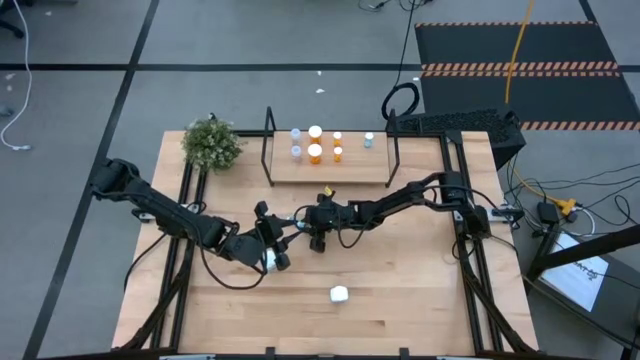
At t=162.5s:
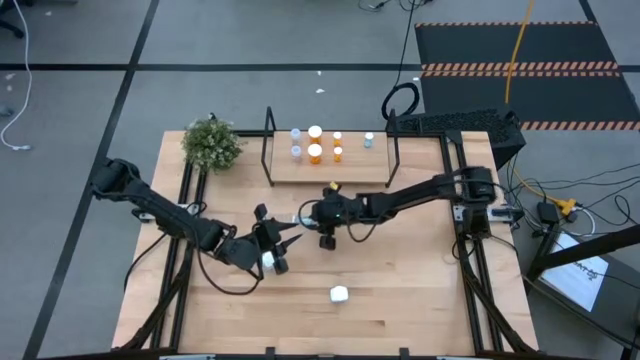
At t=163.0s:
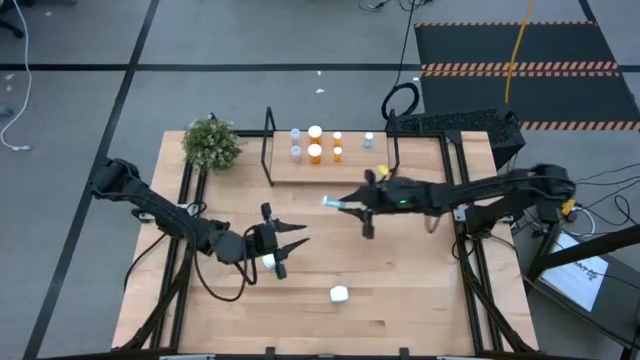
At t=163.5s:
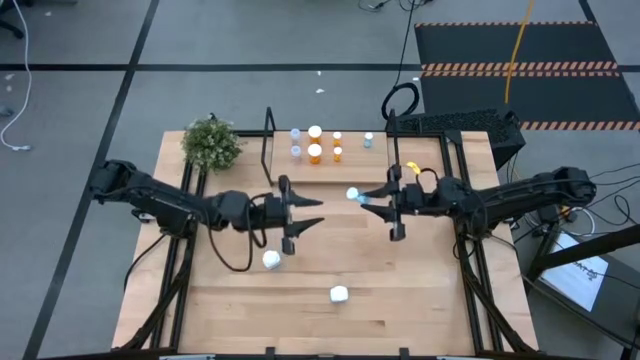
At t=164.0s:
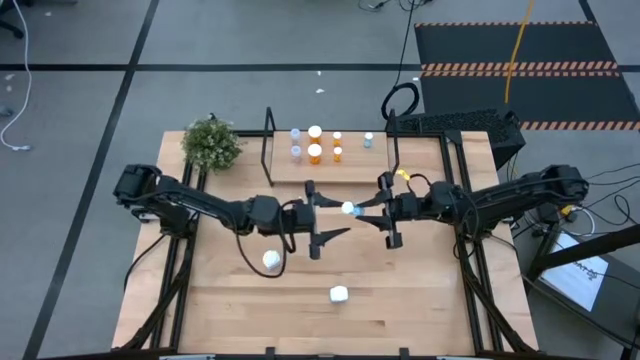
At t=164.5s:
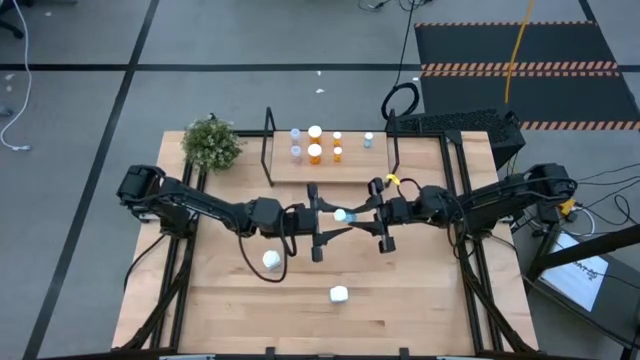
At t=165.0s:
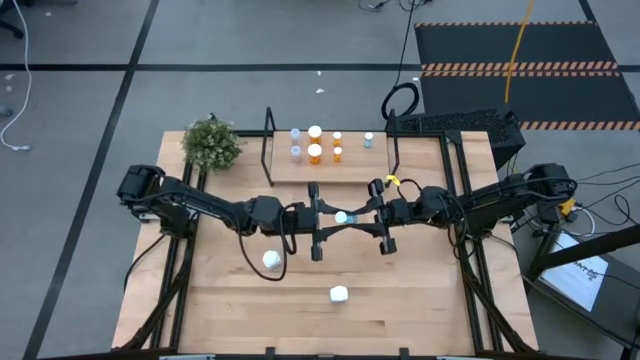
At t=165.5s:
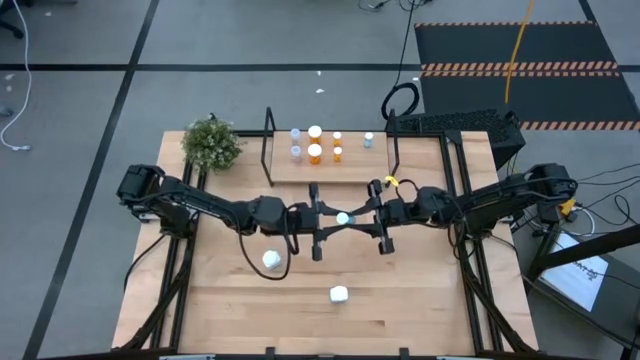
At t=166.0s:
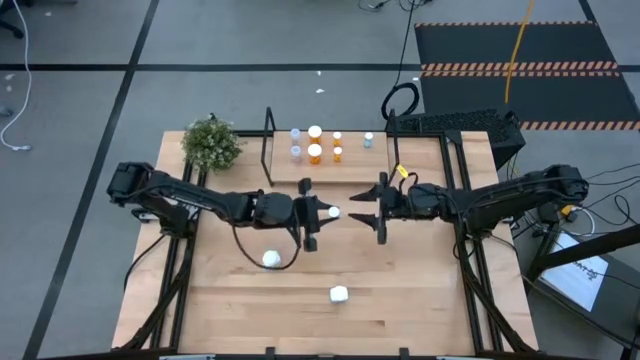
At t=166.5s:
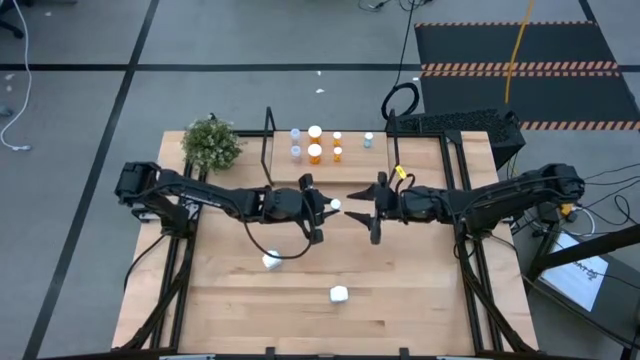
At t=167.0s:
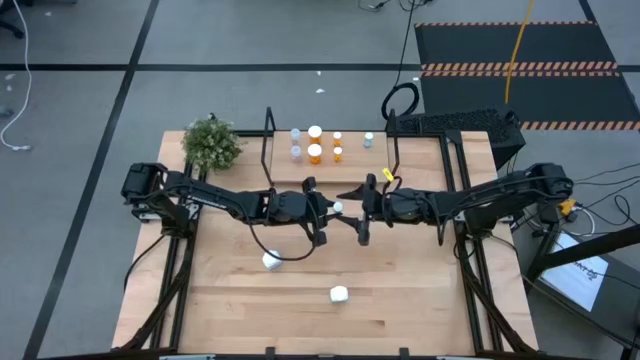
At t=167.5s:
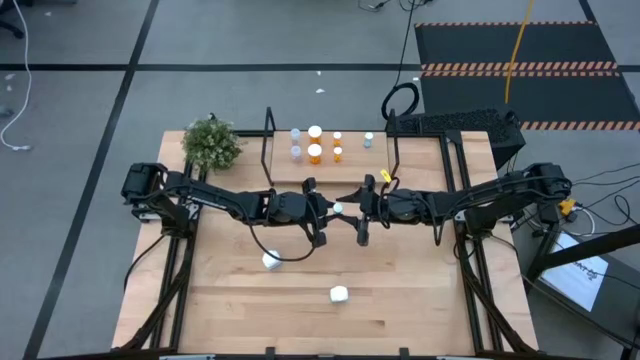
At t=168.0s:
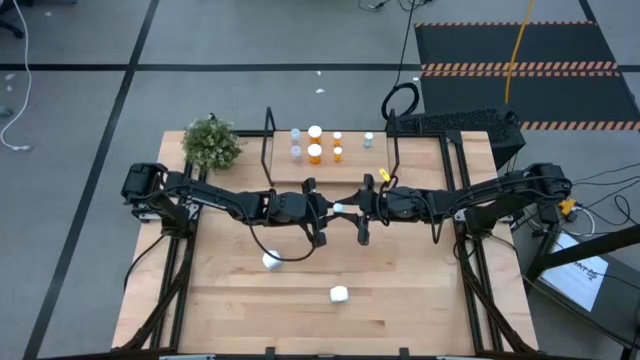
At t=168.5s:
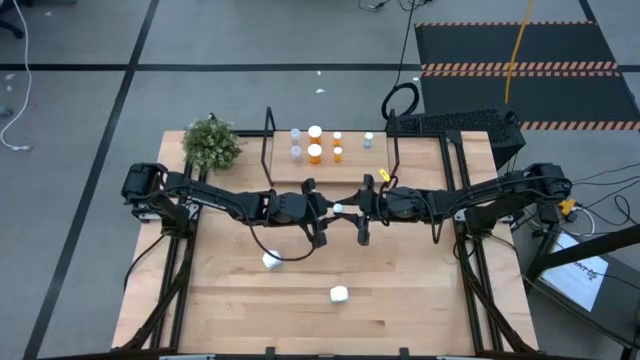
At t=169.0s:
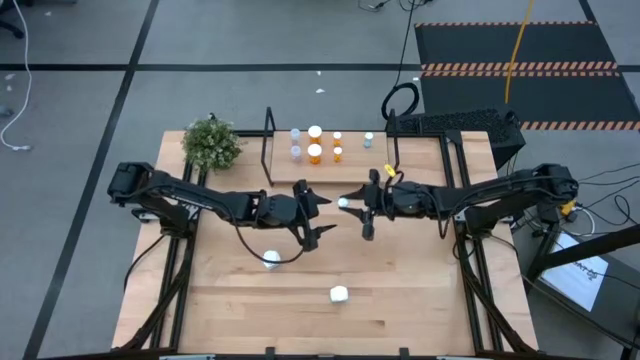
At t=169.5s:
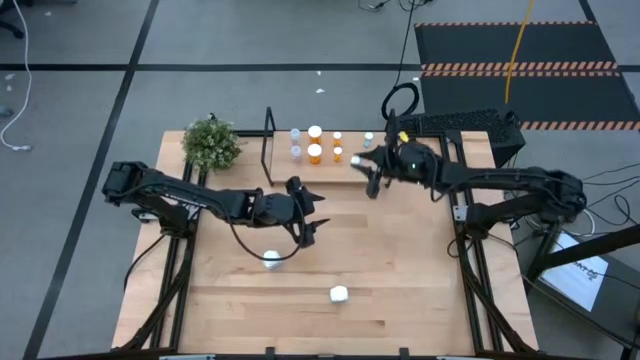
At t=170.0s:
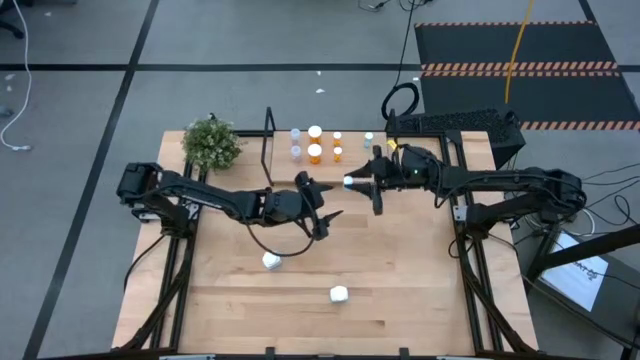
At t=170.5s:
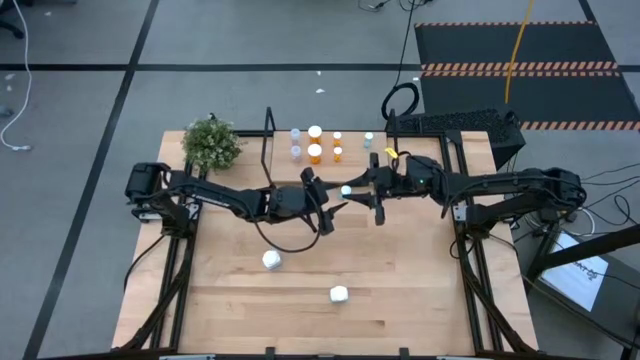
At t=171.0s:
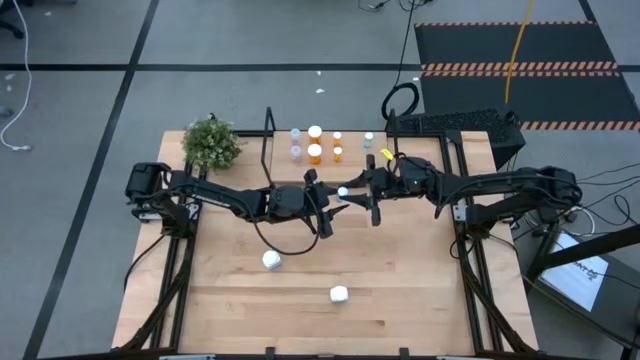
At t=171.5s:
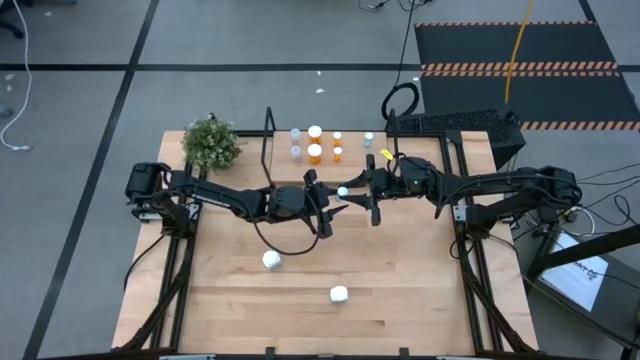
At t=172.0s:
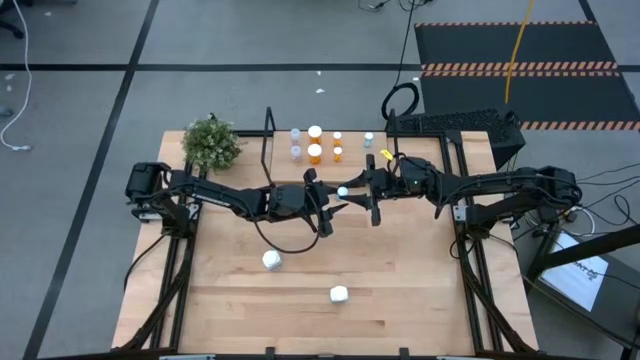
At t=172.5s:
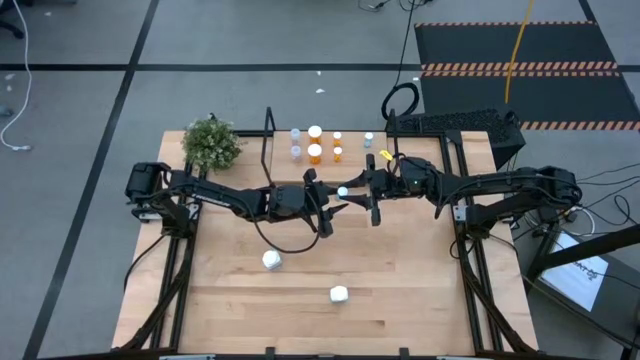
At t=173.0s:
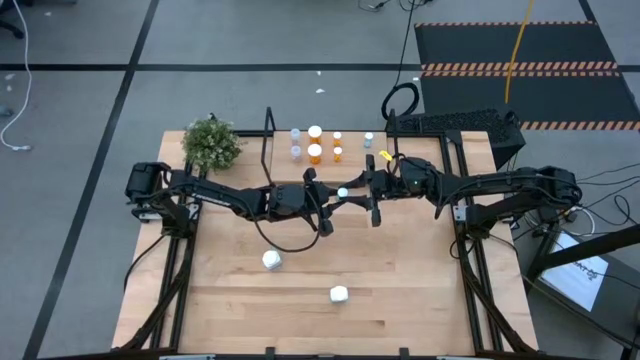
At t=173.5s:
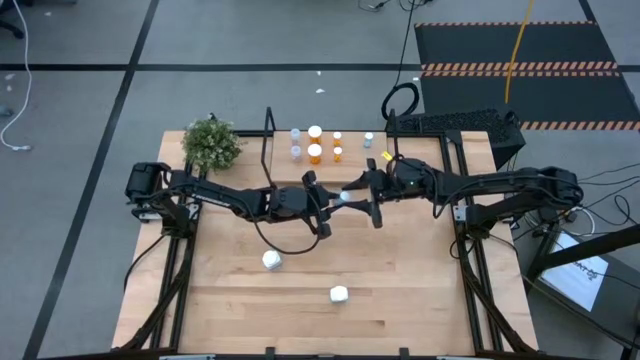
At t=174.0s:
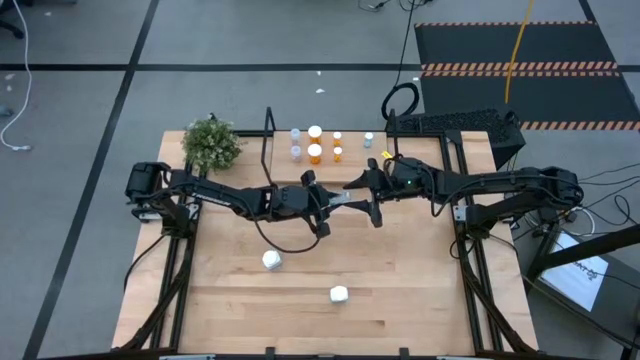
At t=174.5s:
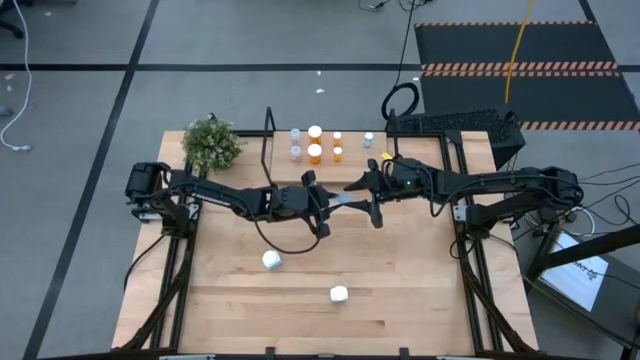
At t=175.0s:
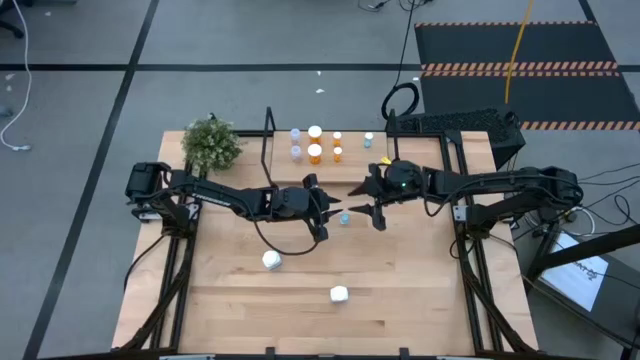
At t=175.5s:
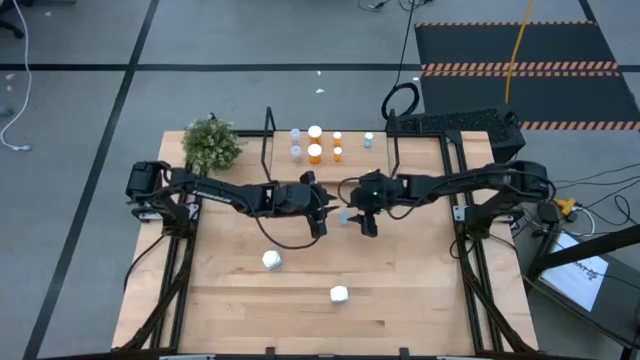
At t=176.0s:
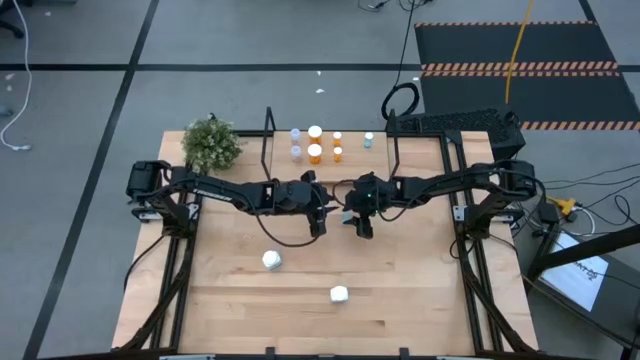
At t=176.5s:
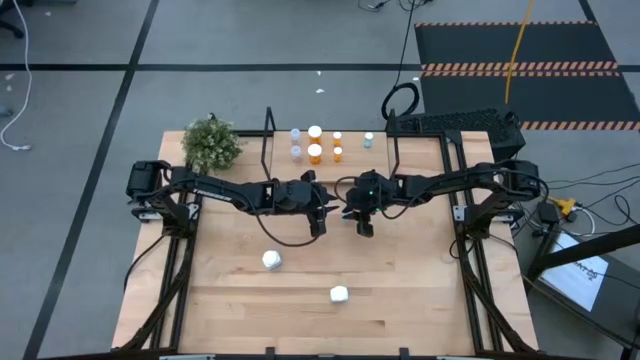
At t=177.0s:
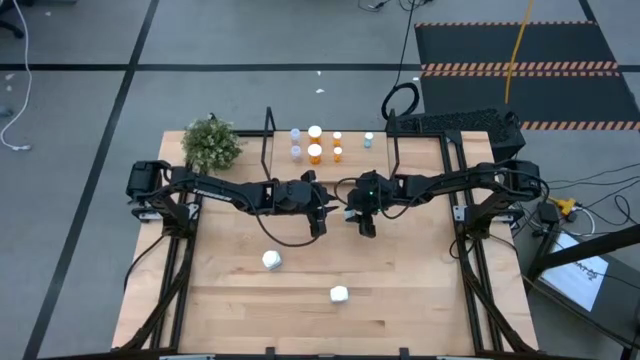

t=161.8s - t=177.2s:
Task: Pick and place medicine bottles onto shelf by color
Put the blue pill bottle on the shelf aligned with the other blue pill bottle

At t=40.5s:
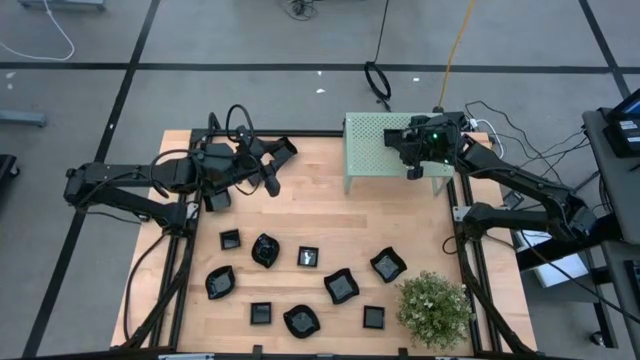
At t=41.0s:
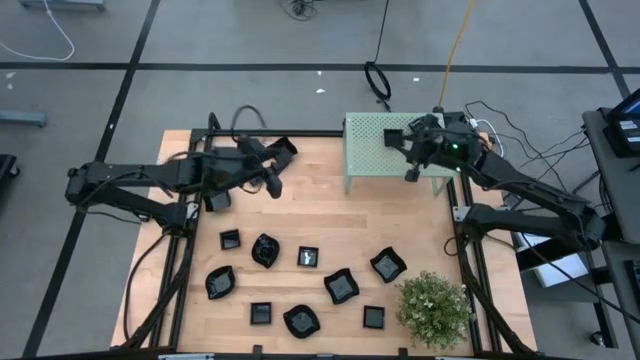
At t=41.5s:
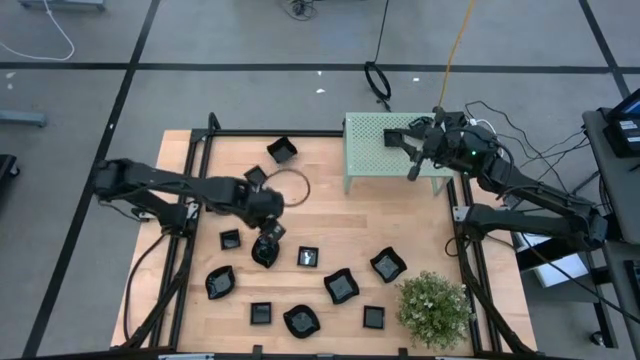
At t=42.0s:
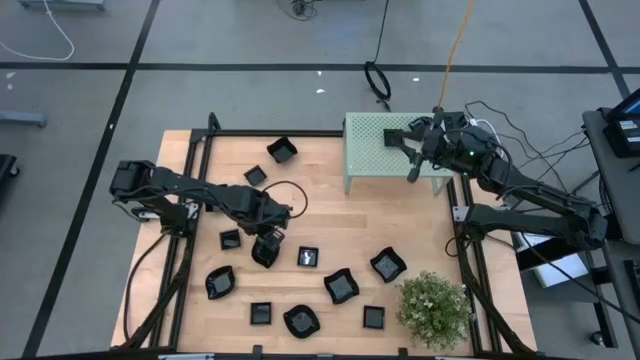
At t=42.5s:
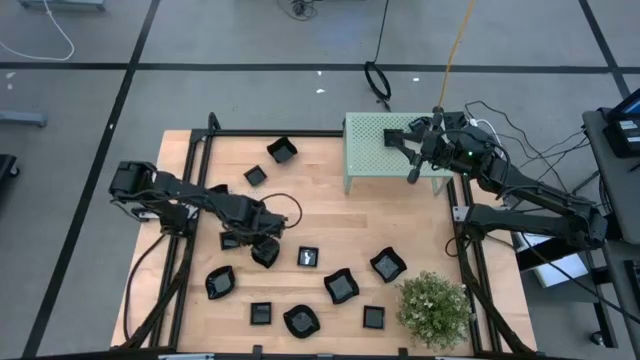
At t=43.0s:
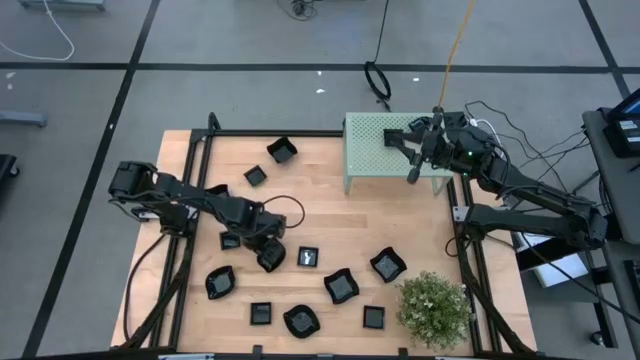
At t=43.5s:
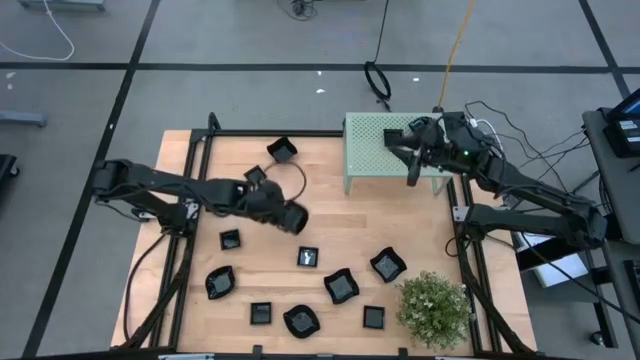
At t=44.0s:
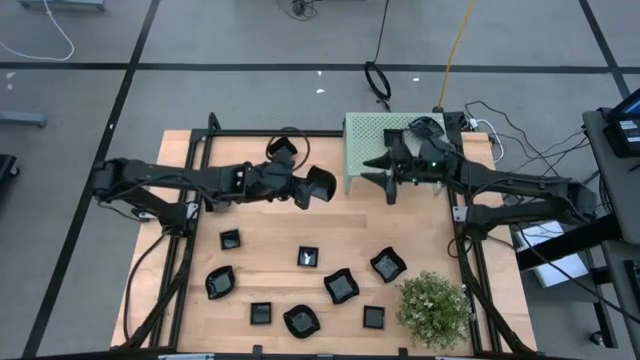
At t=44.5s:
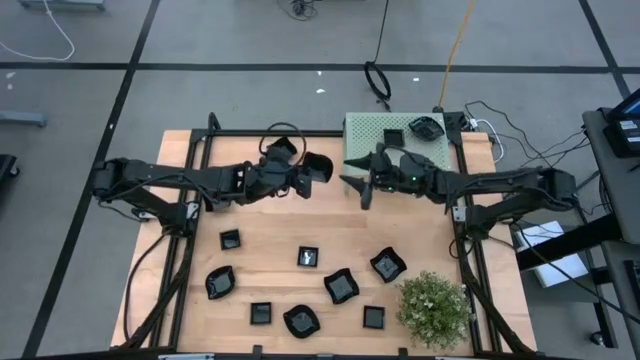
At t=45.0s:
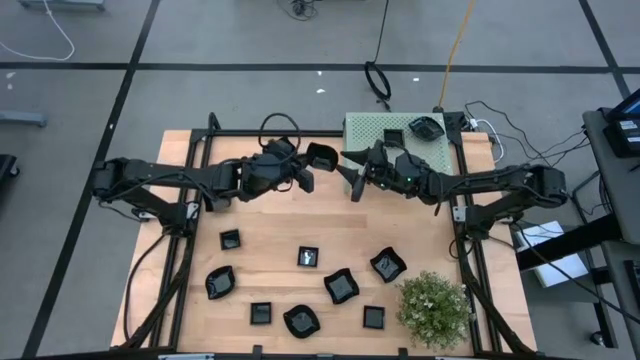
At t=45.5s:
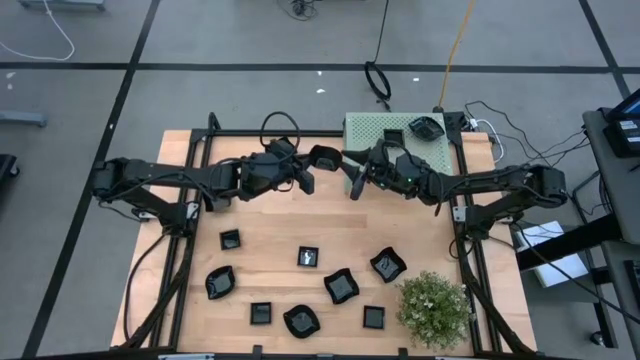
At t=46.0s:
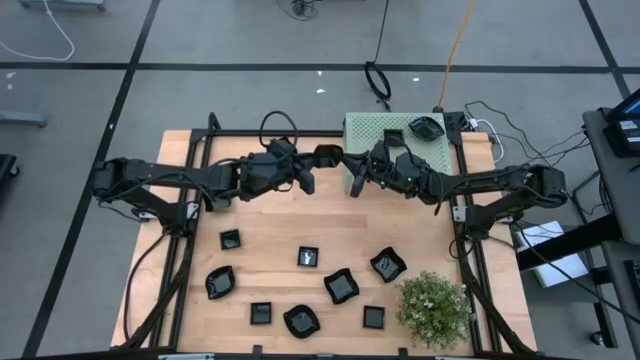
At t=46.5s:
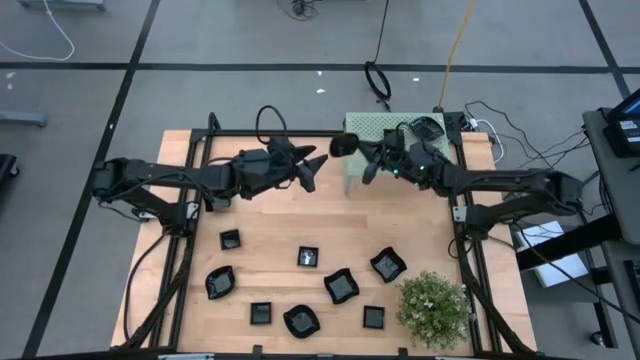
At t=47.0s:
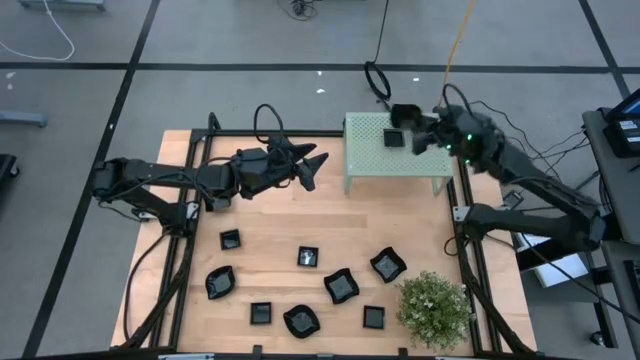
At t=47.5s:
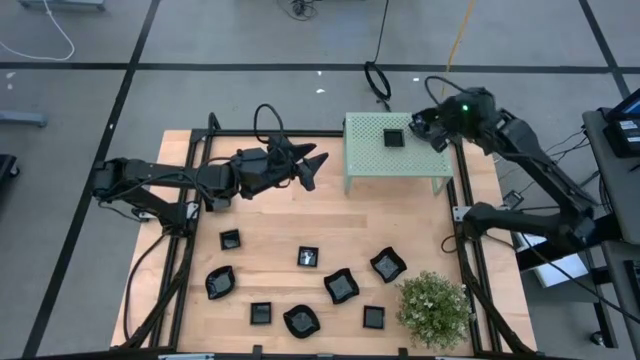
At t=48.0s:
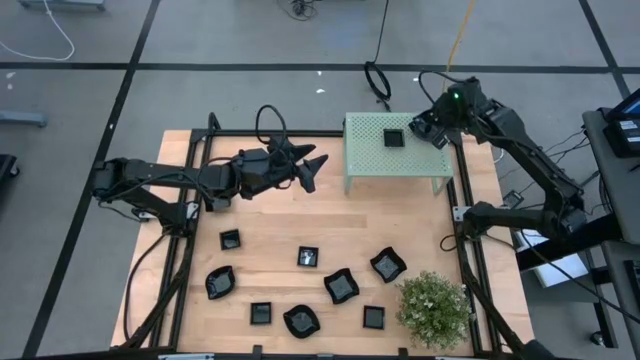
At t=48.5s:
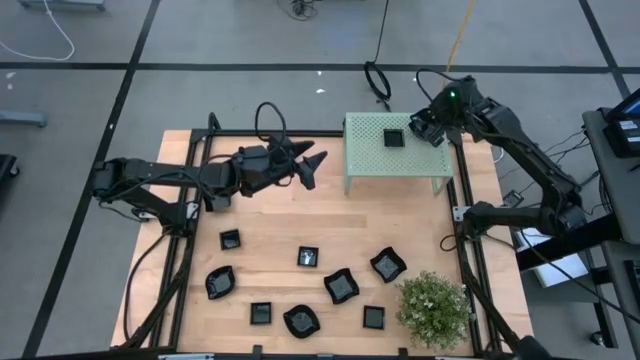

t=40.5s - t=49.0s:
Task: Pick & Place Mini shaped plates
Stack the black leaf-shaped plate on top of the leaf-shaped plate on the shelf
